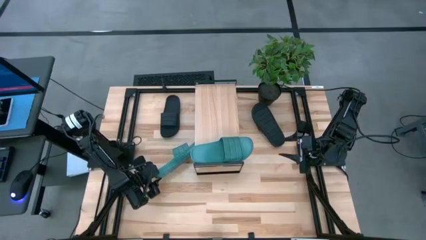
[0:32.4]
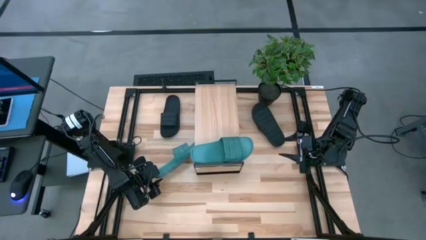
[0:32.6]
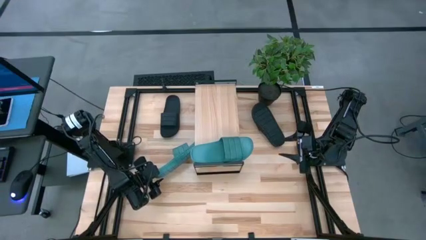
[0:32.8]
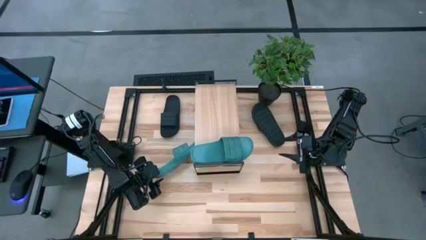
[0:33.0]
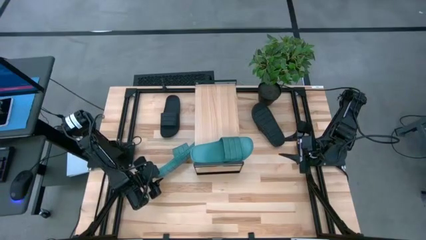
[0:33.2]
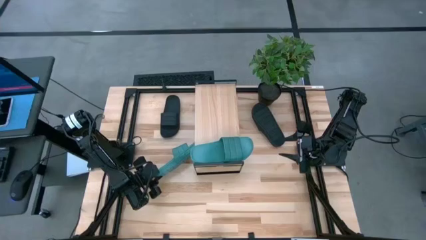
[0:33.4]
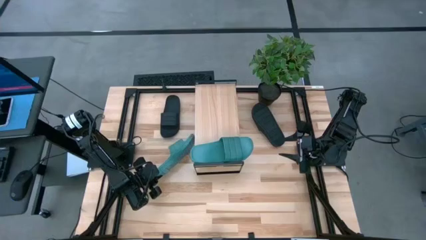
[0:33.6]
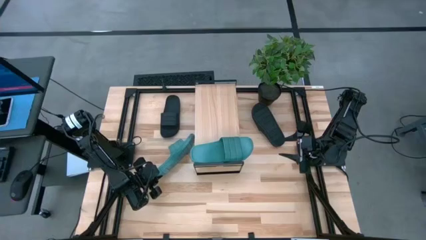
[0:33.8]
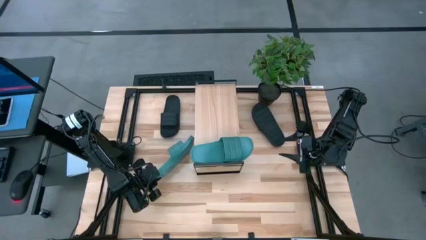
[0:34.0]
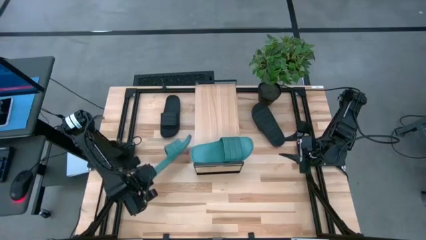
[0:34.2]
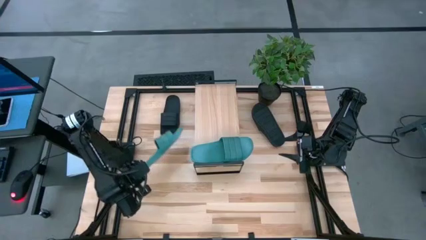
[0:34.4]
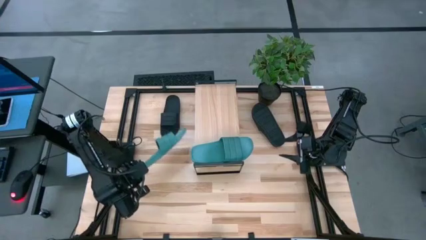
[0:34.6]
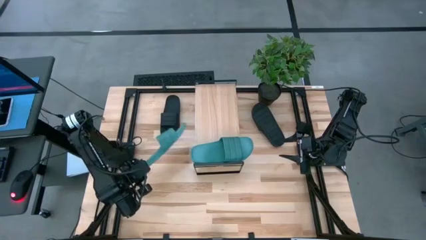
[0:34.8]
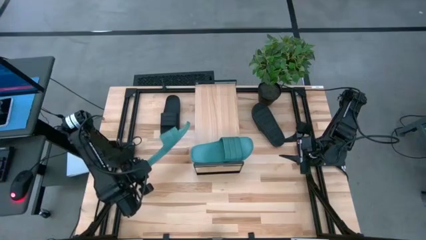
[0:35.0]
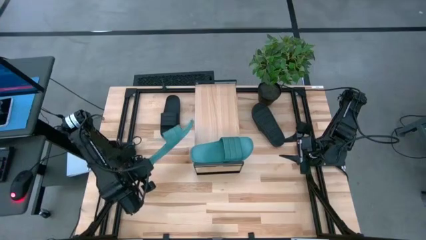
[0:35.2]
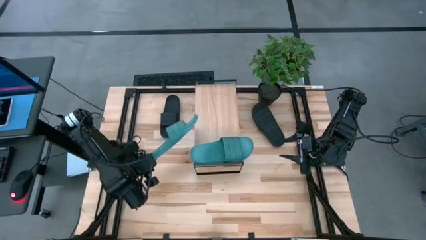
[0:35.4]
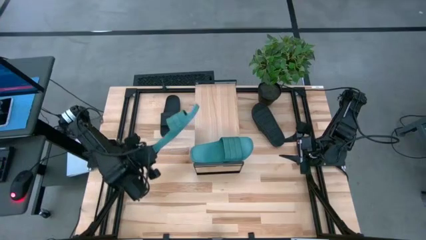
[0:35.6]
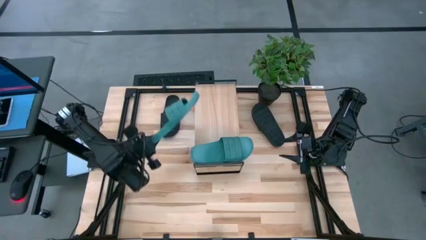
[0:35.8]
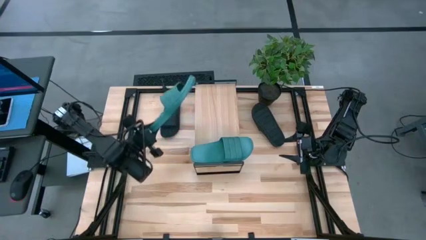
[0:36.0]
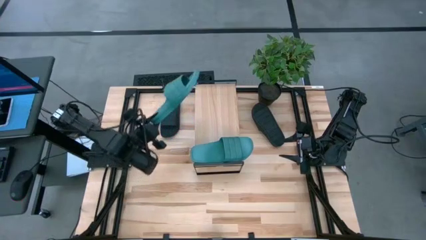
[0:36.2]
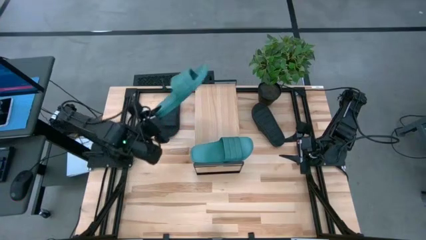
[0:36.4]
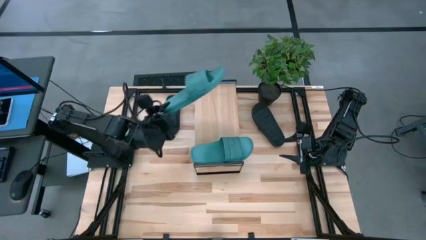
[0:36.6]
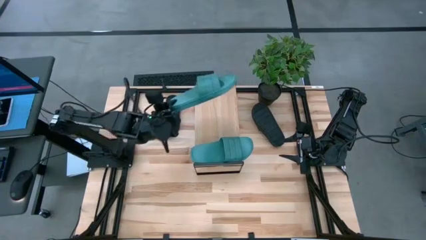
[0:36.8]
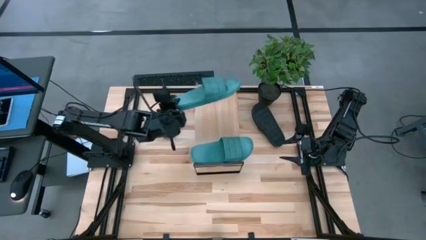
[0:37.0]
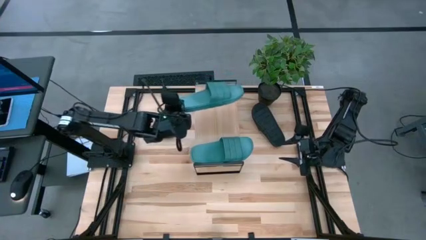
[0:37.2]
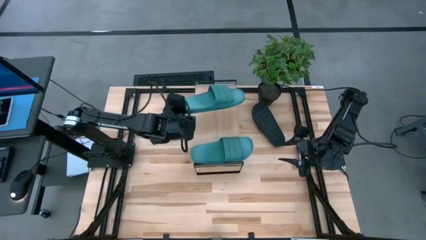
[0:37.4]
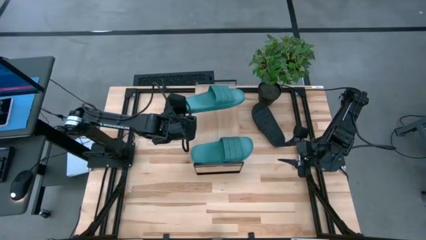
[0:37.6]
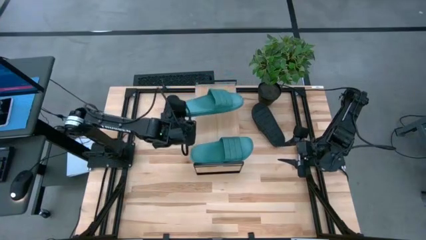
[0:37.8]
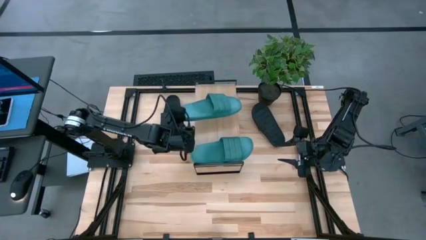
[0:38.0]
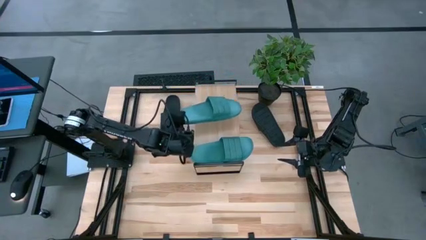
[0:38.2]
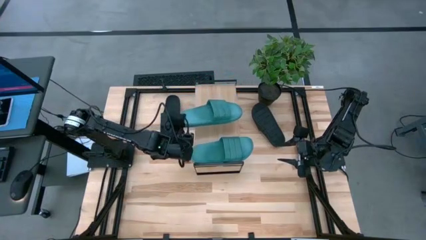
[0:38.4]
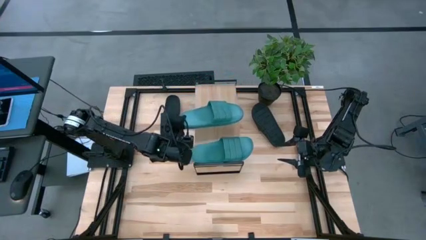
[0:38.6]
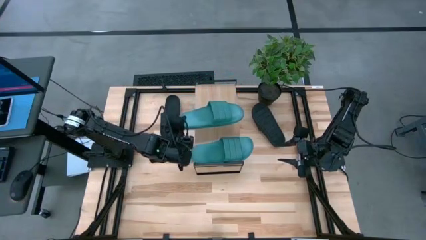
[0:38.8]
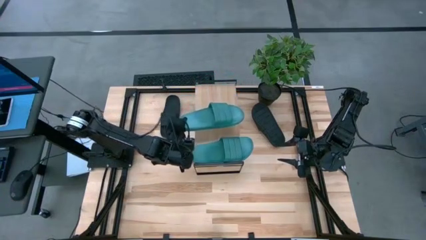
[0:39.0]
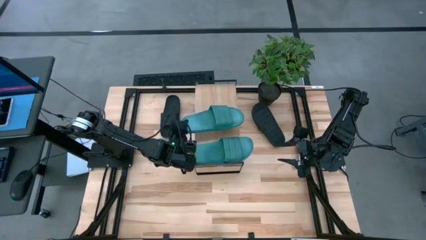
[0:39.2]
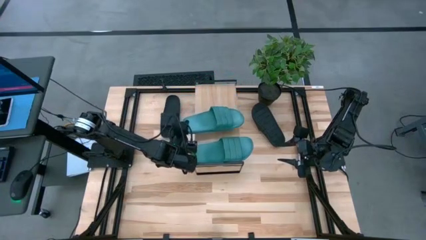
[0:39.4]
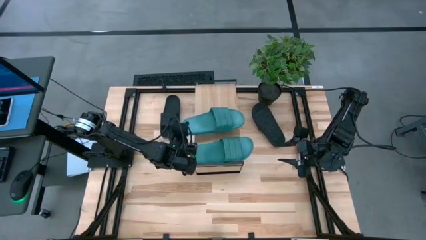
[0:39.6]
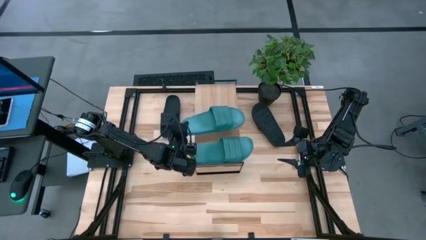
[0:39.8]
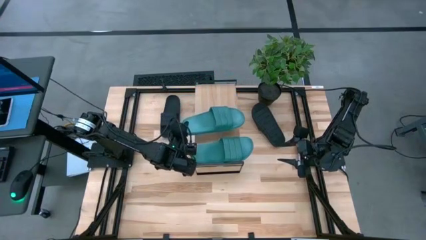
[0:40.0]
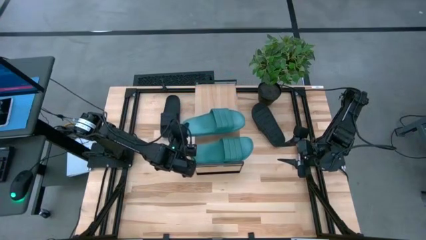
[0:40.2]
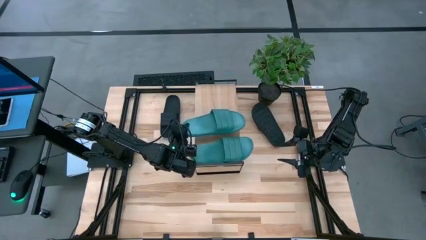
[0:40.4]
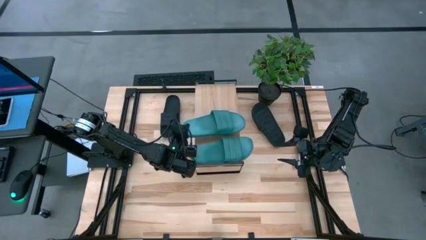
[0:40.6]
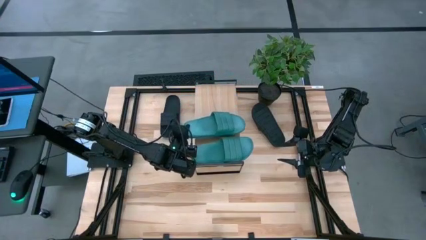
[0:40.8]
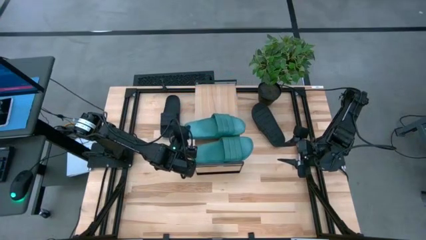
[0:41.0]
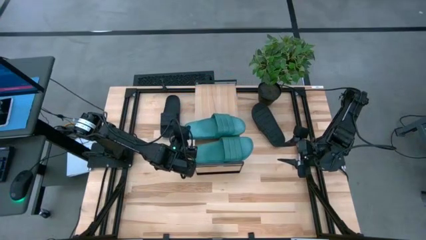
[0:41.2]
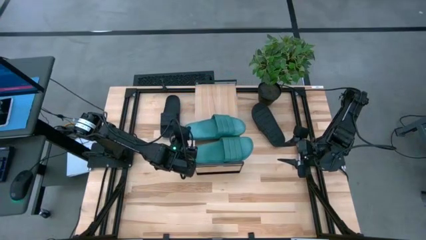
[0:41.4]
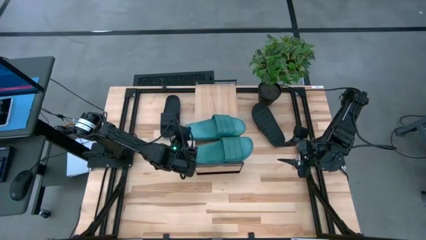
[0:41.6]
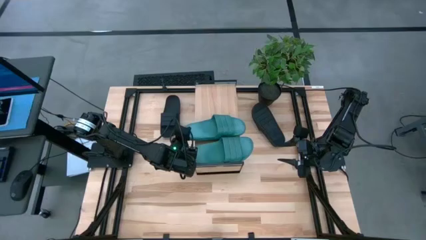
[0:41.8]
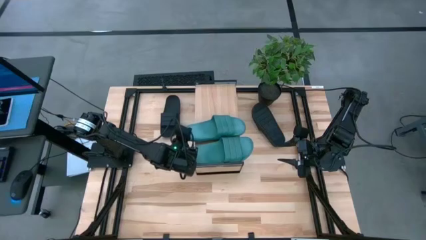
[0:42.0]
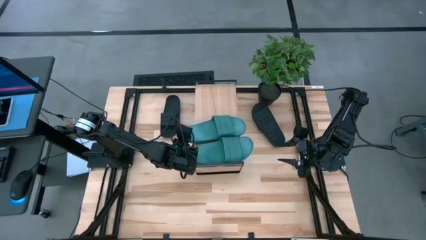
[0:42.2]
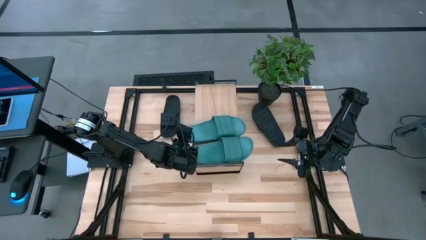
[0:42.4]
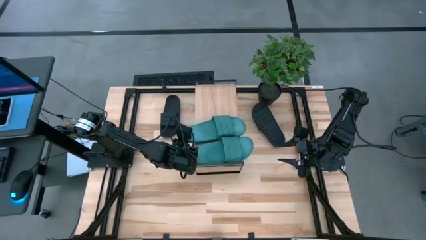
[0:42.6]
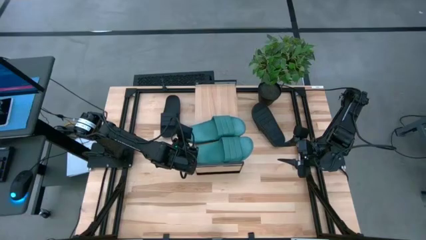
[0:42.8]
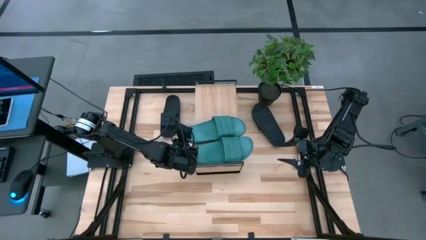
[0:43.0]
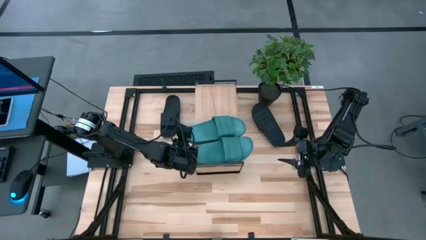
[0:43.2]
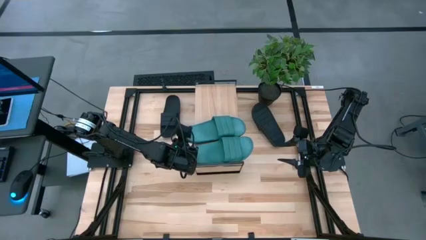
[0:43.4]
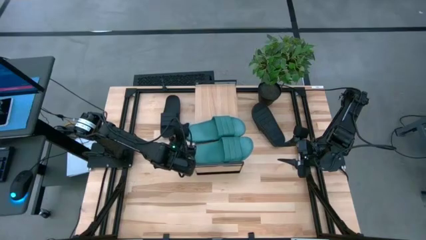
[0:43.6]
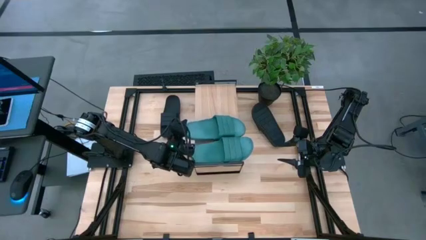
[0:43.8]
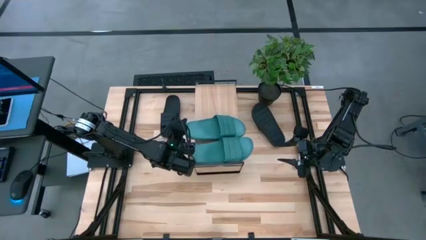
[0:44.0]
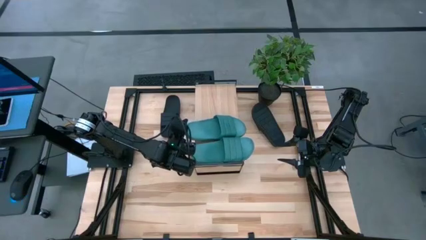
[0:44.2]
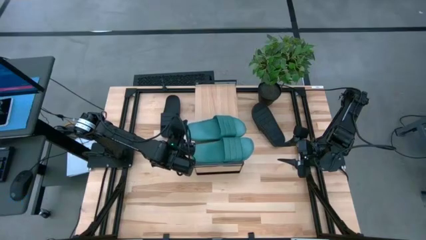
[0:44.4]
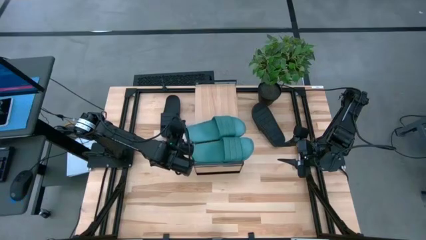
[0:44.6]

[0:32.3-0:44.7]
Task: Pick and place slides into the shelf
Put the green slipper on the shelf
